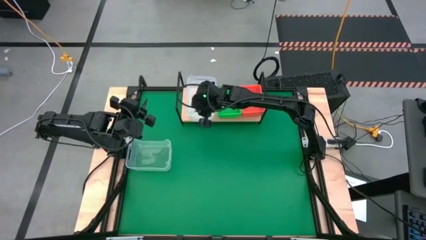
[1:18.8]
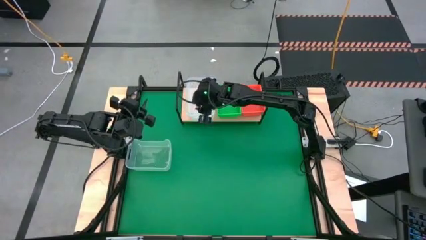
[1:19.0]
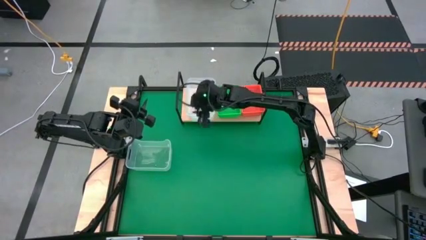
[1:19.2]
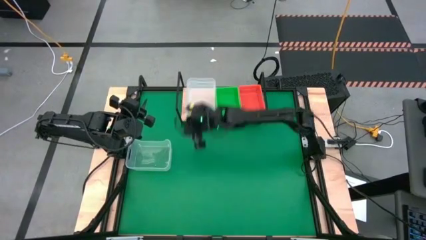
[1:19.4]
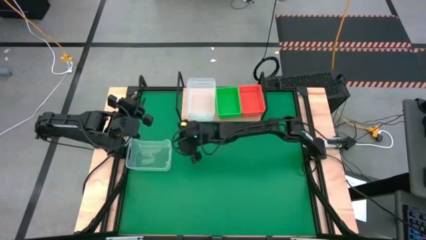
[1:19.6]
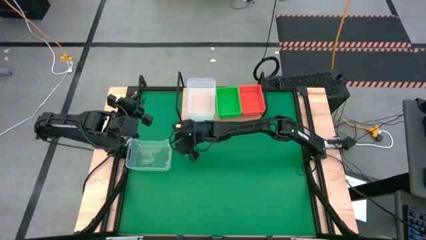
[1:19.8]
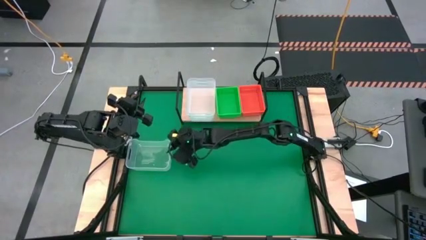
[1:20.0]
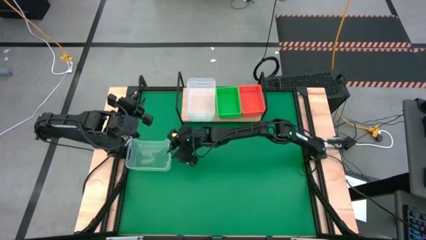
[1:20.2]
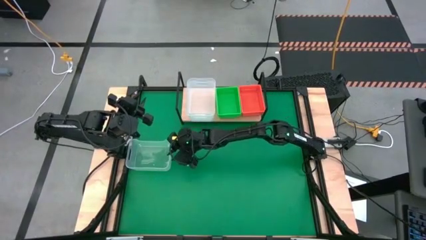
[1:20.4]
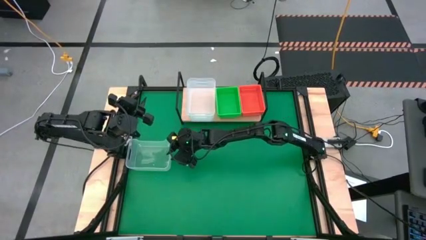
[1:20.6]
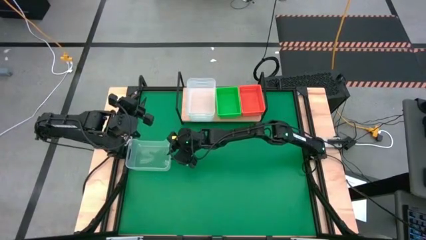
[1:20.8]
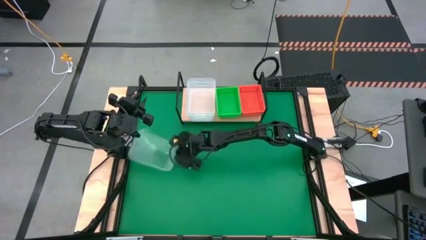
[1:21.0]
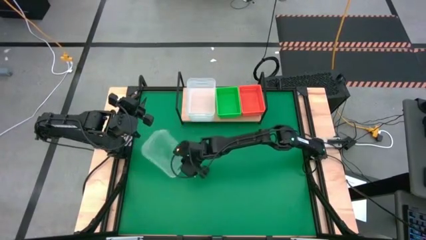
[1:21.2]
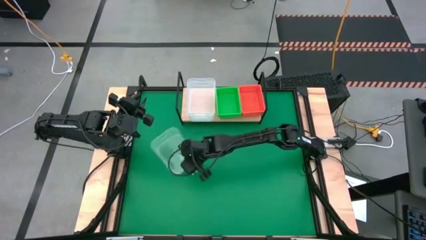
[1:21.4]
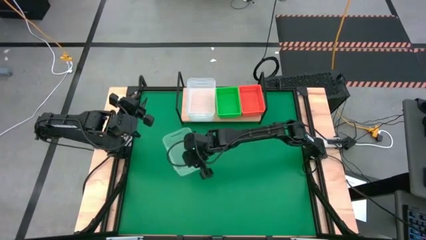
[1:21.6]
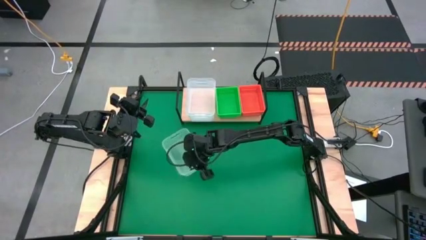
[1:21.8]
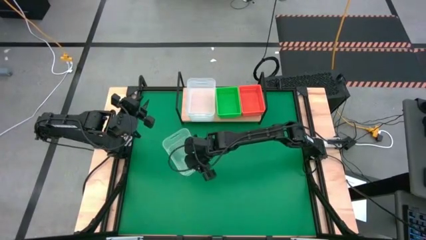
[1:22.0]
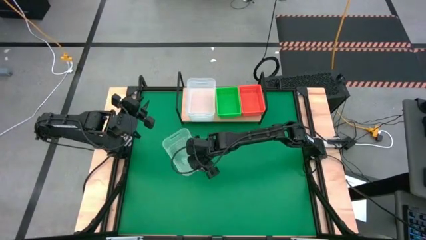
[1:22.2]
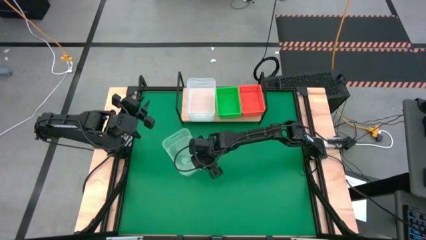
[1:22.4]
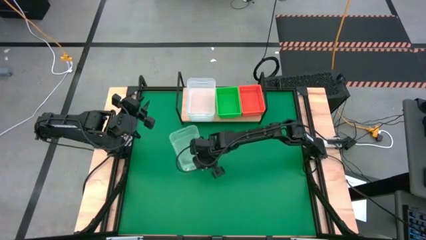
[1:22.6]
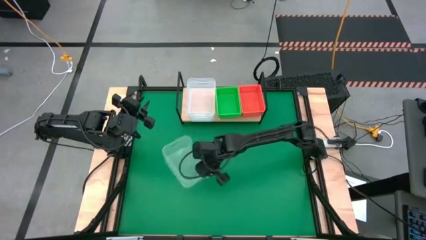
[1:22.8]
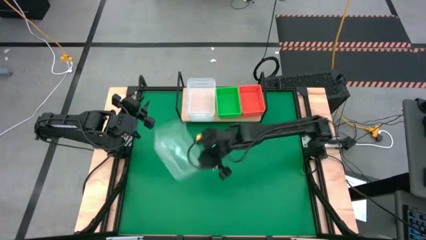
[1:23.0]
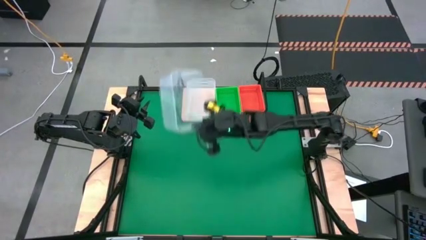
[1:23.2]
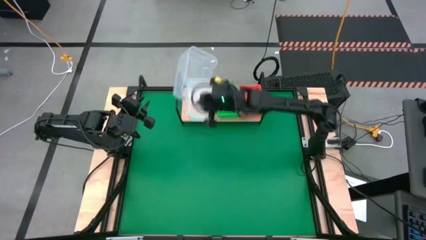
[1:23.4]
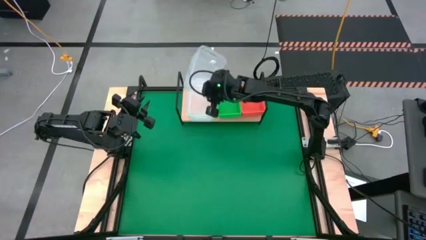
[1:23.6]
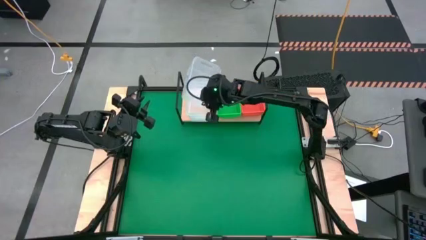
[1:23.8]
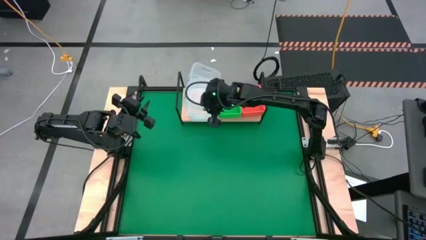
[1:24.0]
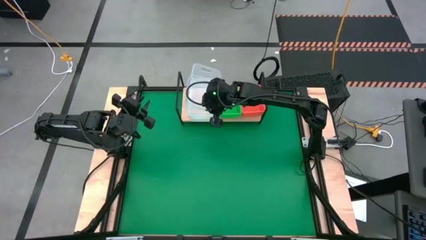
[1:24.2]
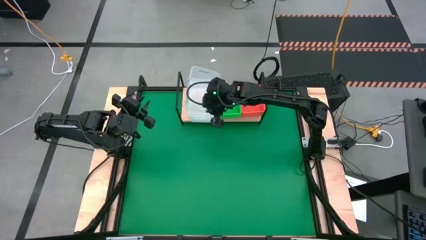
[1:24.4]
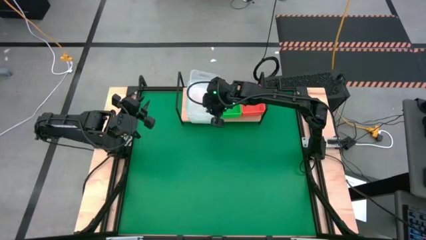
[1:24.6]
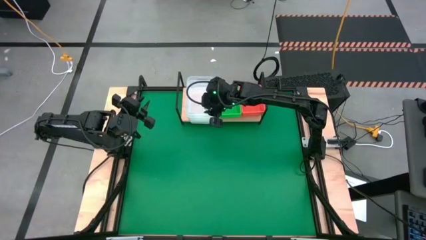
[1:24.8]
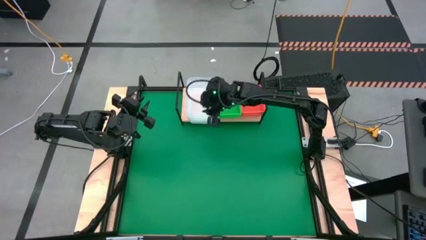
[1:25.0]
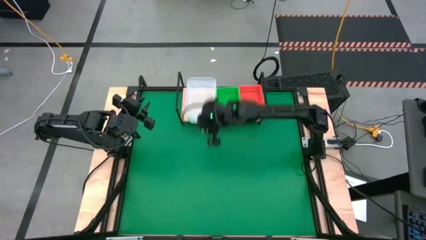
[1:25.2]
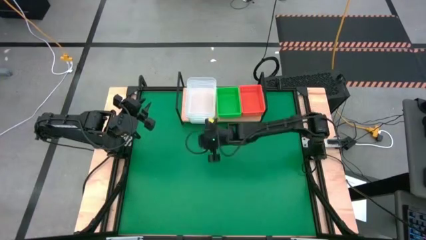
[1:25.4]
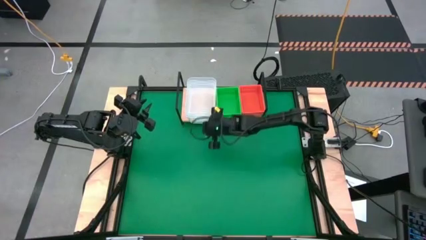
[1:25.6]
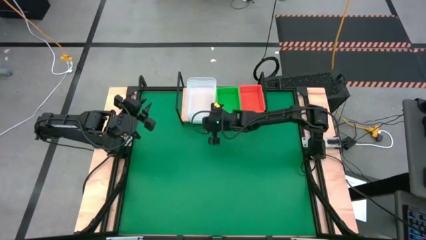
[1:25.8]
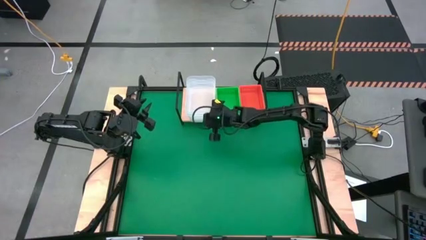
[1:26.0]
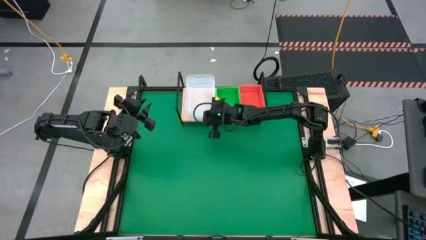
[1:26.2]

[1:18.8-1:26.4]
Task: Stack baskets on shelf by color
Stack the transparent bin on top of the other transparent bins on the shelf

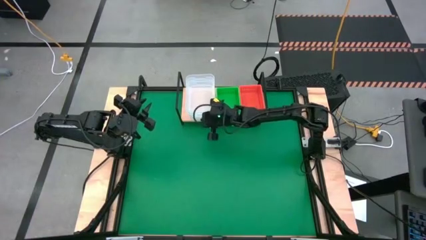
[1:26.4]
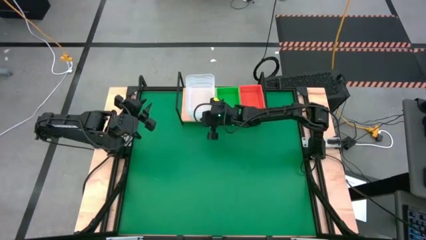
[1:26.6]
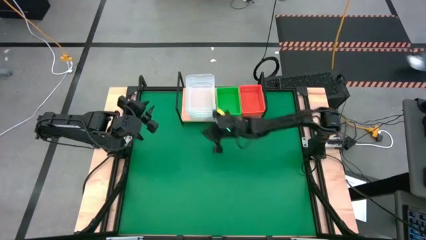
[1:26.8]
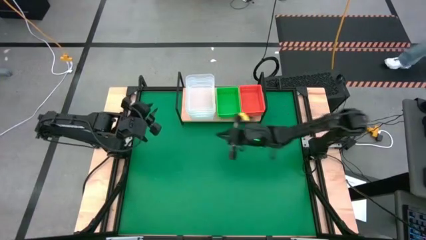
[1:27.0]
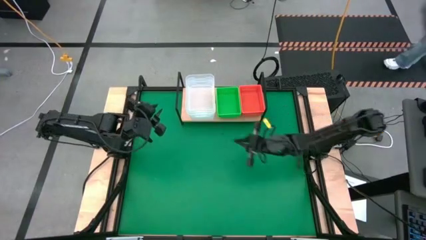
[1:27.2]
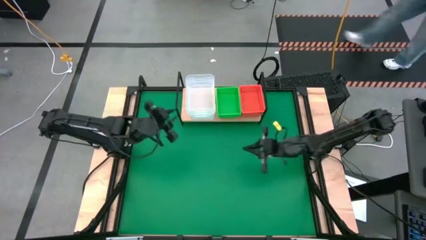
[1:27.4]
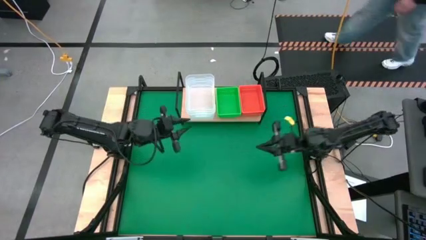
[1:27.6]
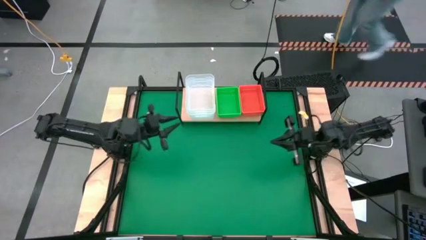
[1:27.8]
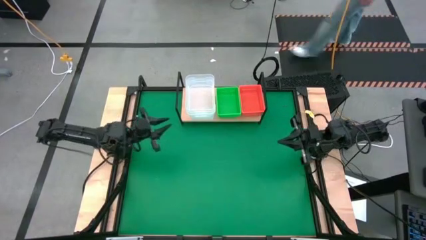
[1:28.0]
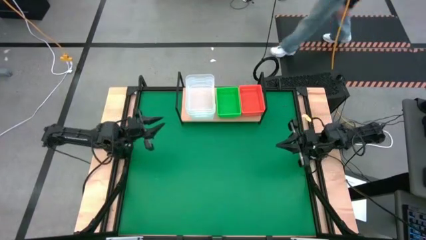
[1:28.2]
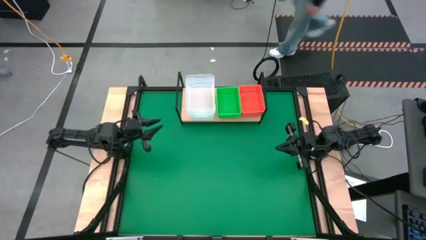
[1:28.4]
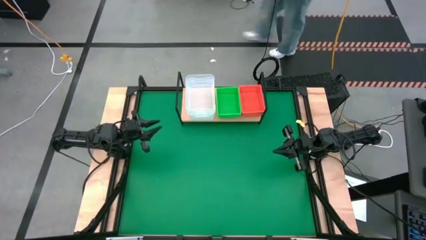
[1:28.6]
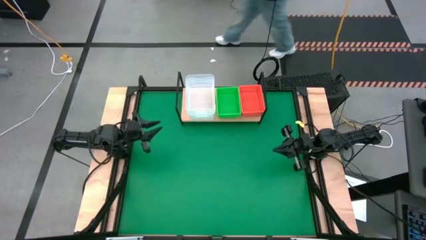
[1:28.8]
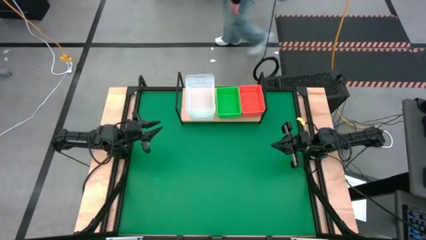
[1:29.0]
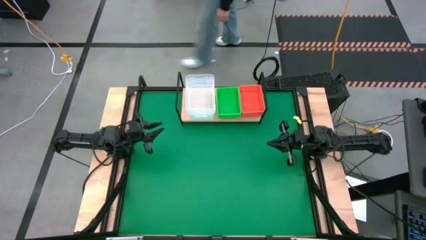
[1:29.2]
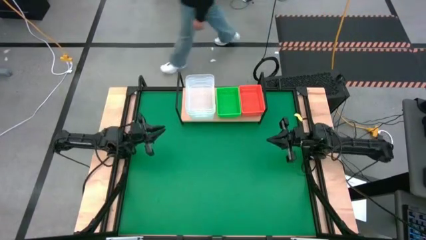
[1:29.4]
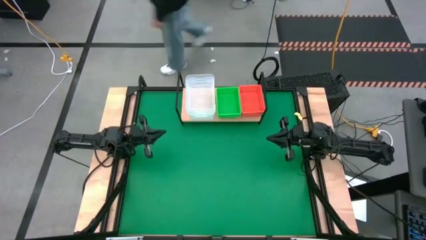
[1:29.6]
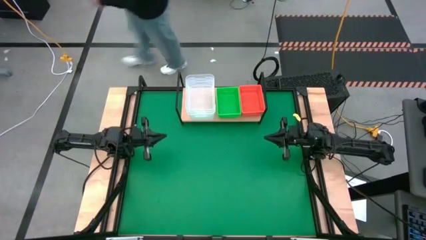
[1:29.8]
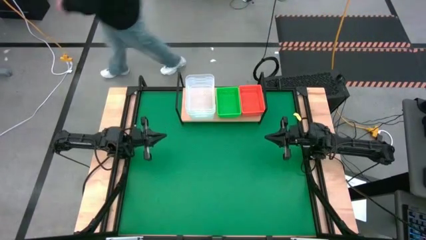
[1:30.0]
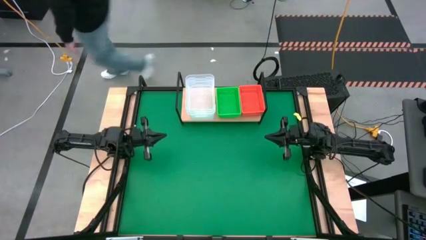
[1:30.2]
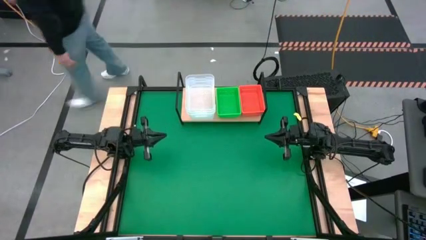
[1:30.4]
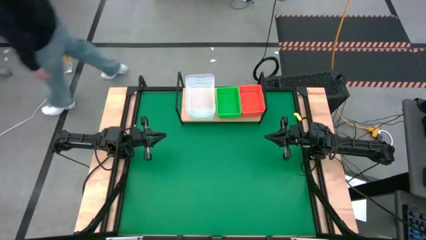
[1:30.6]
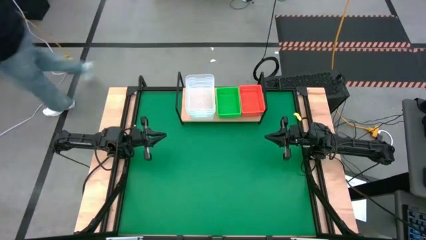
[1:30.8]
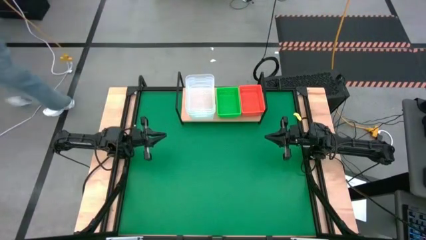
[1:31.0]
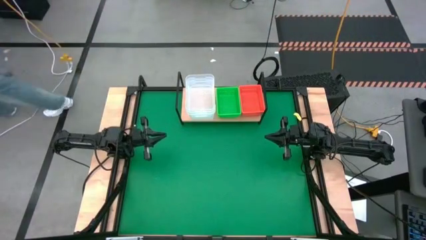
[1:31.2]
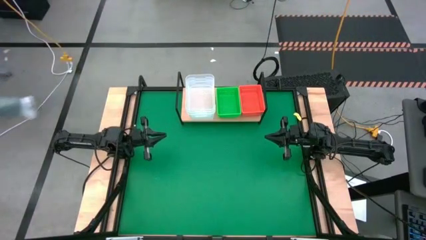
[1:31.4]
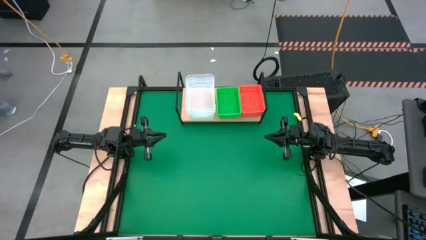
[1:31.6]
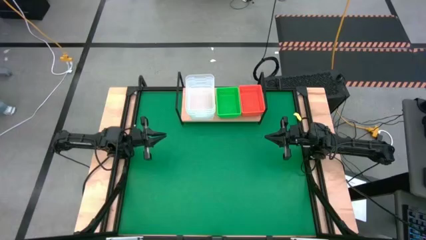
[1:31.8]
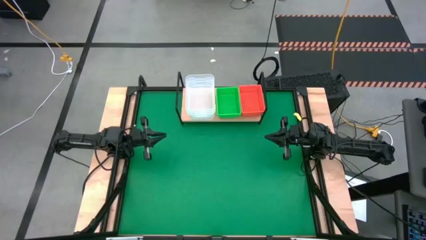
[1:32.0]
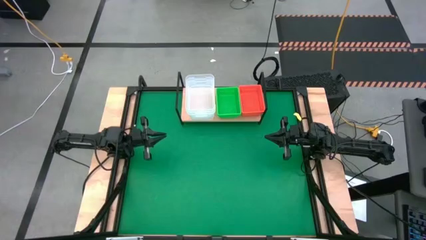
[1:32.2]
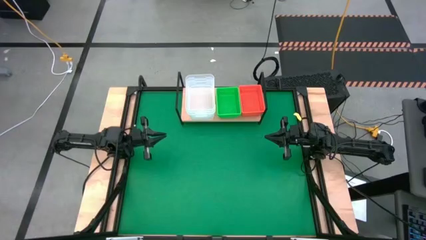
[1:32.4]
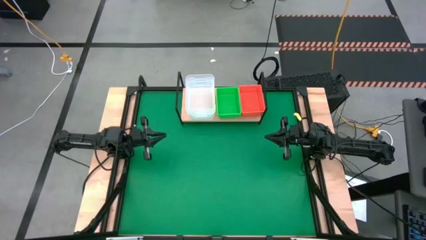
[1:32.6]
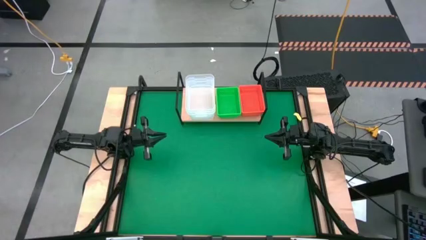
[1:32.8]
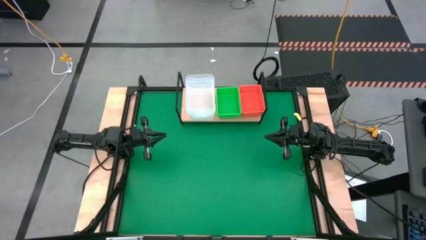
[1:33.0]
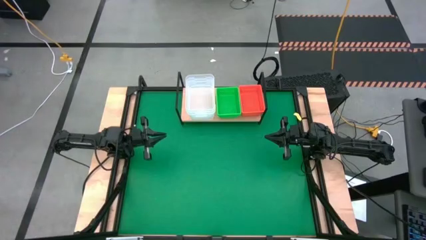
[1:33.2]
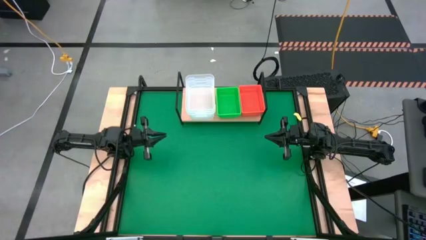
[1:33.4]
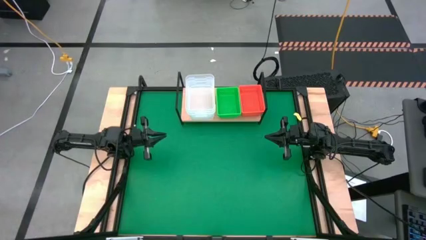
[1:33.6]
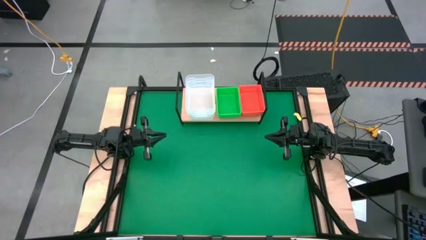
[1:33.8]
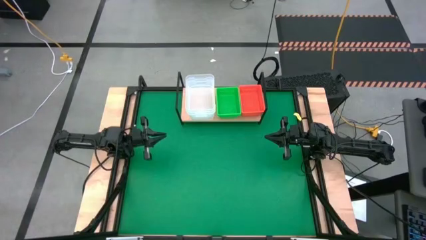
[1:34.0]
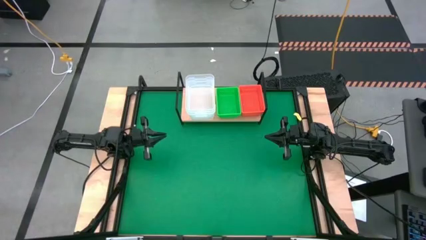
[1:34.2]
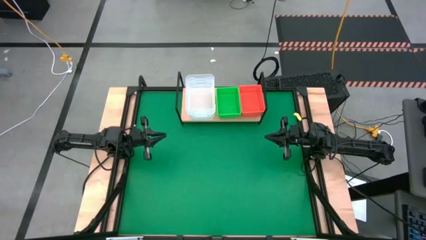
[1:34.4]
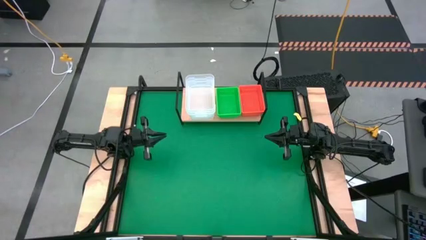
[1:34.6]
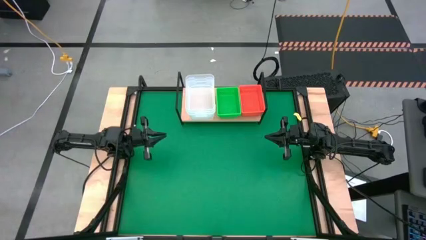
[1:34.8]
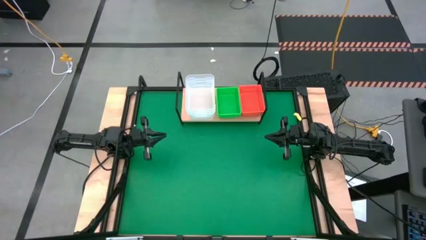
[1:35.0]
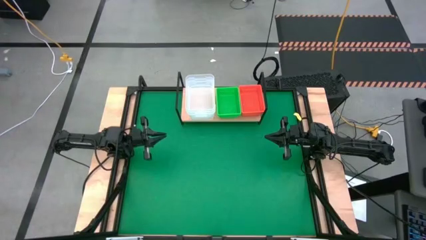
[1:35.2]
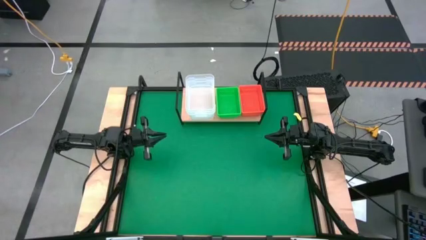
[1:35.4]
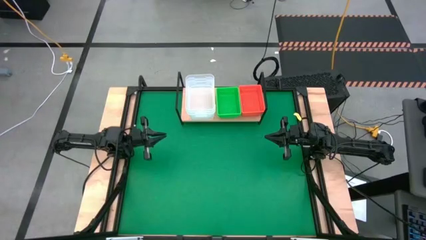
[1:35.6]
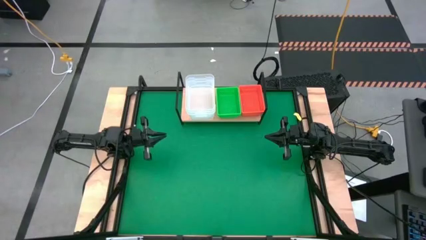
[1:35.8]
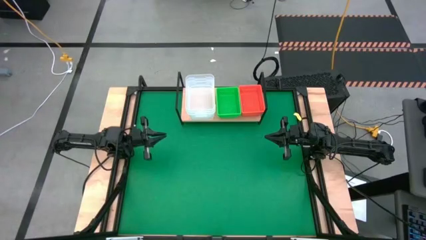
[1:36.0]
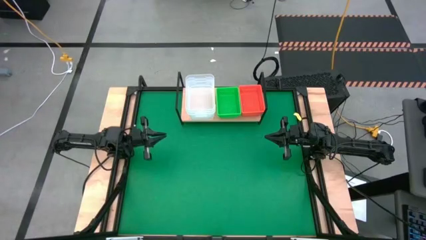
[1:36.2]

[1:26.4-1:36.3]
Return to Home Position
